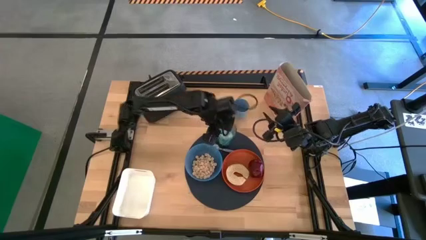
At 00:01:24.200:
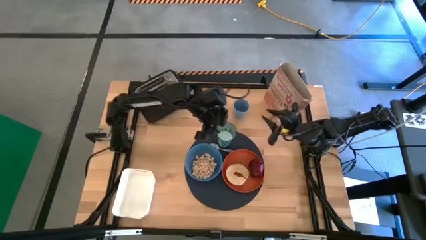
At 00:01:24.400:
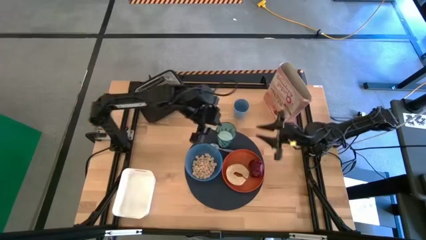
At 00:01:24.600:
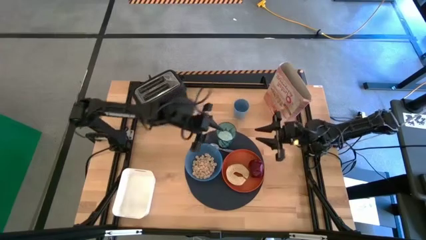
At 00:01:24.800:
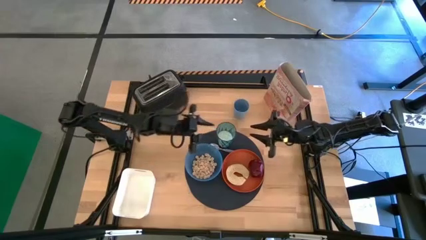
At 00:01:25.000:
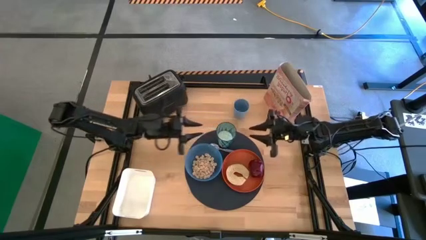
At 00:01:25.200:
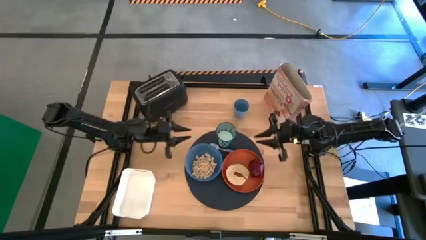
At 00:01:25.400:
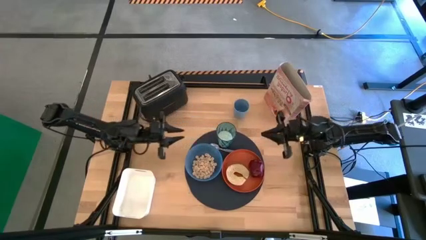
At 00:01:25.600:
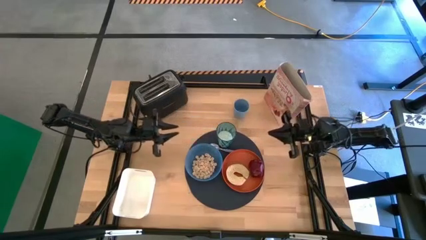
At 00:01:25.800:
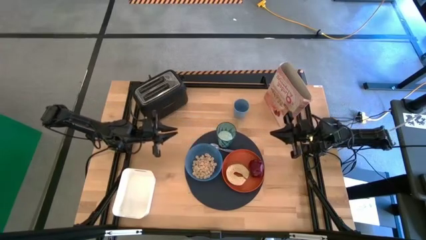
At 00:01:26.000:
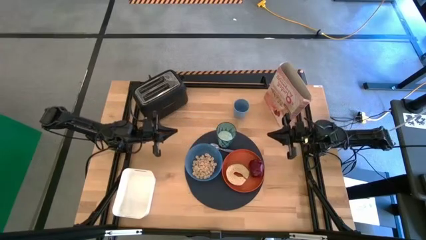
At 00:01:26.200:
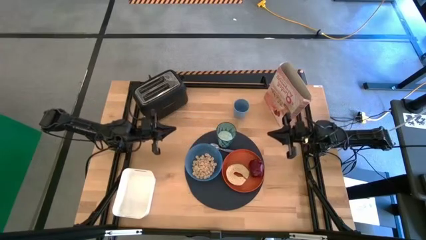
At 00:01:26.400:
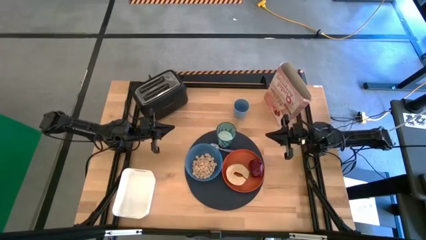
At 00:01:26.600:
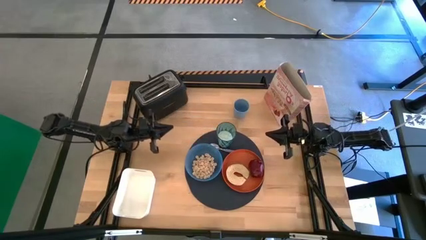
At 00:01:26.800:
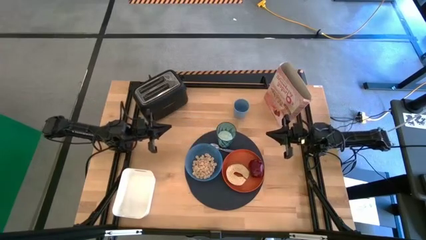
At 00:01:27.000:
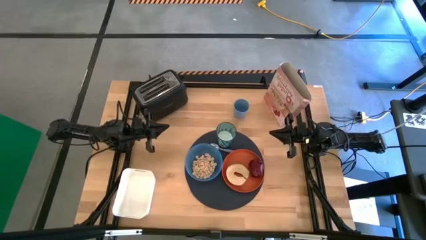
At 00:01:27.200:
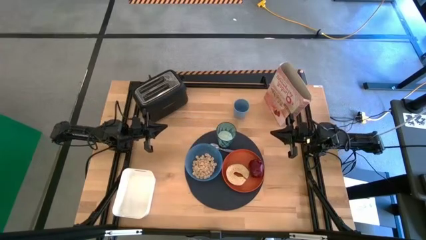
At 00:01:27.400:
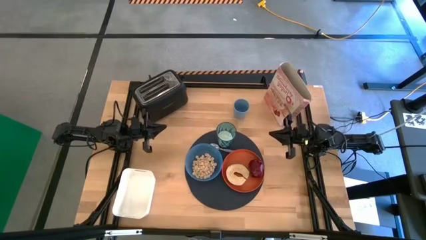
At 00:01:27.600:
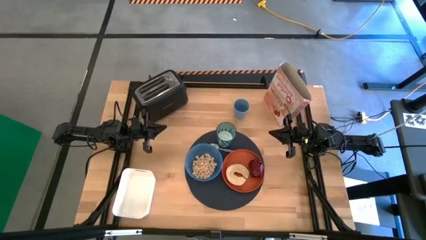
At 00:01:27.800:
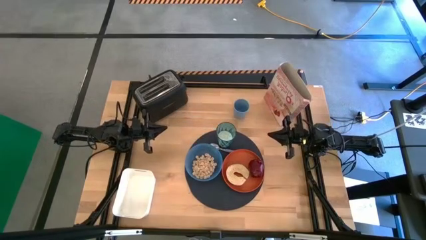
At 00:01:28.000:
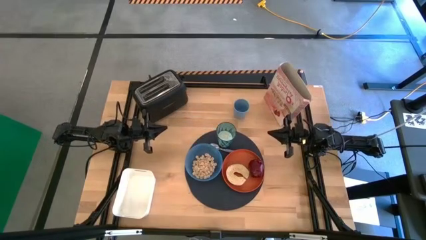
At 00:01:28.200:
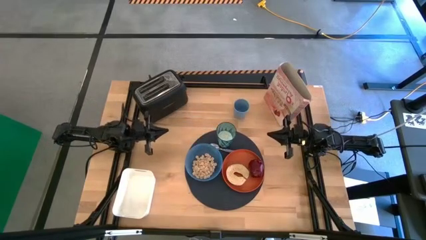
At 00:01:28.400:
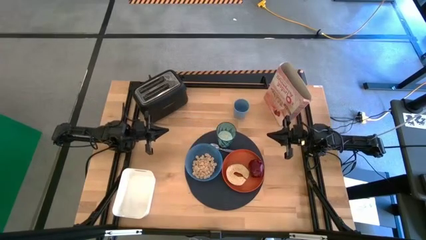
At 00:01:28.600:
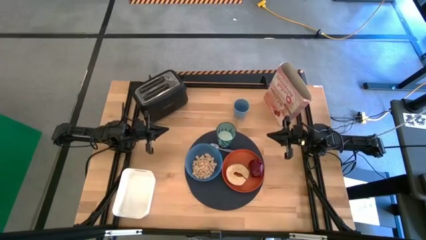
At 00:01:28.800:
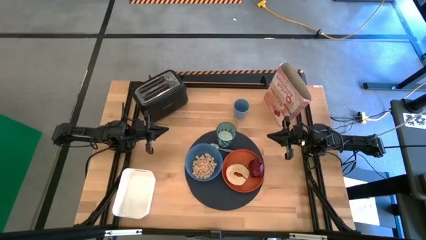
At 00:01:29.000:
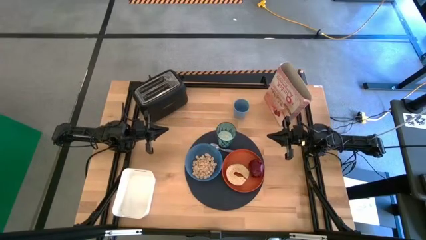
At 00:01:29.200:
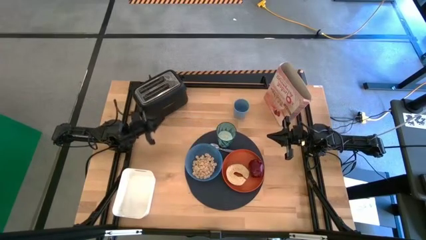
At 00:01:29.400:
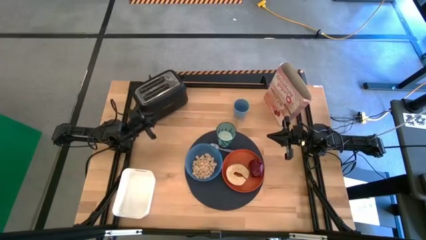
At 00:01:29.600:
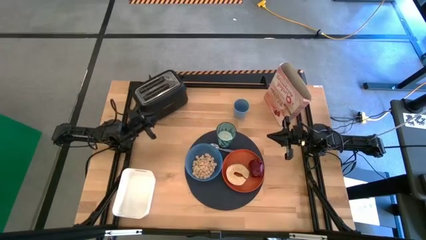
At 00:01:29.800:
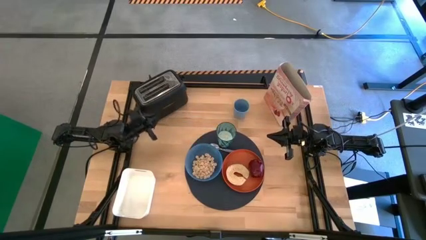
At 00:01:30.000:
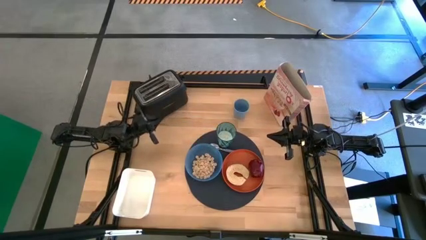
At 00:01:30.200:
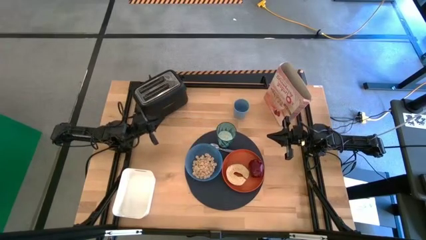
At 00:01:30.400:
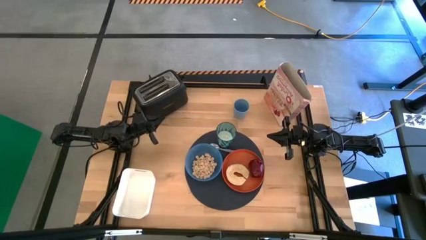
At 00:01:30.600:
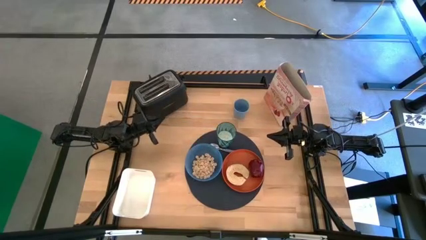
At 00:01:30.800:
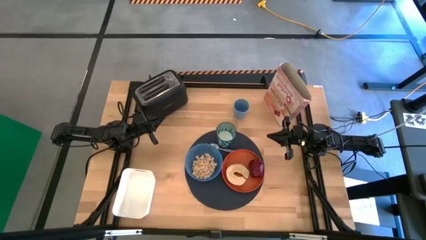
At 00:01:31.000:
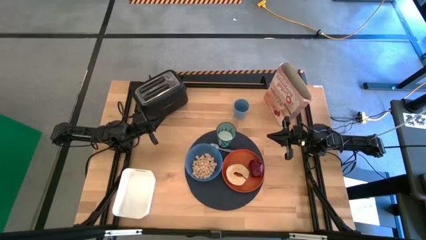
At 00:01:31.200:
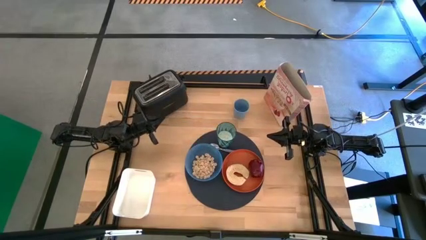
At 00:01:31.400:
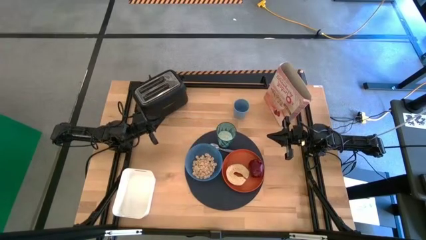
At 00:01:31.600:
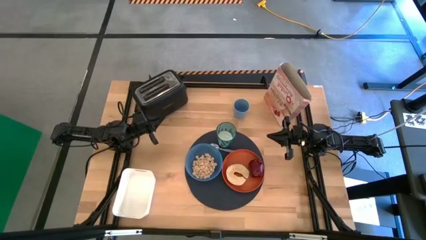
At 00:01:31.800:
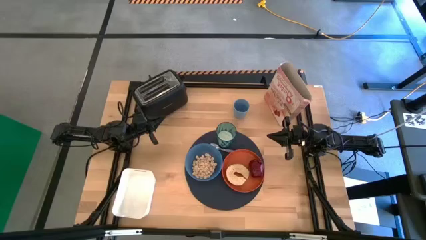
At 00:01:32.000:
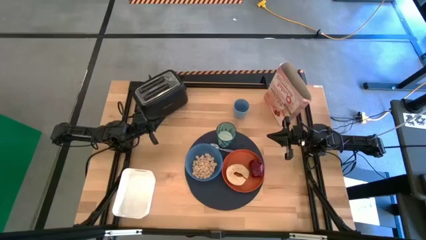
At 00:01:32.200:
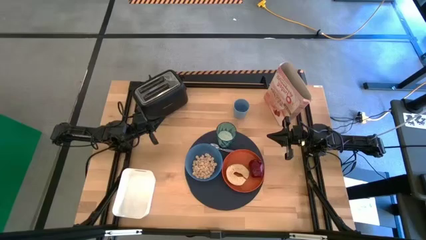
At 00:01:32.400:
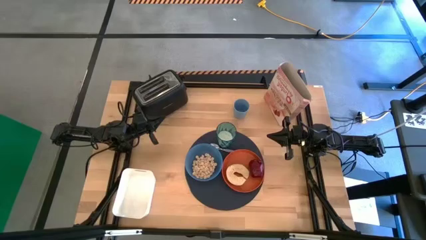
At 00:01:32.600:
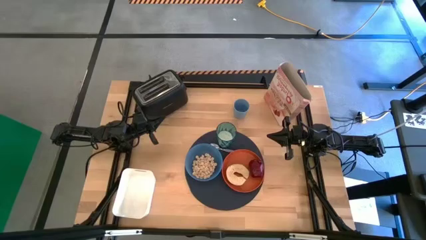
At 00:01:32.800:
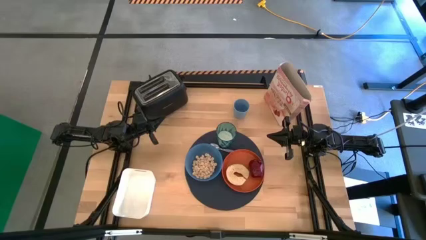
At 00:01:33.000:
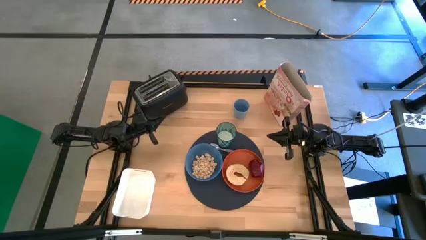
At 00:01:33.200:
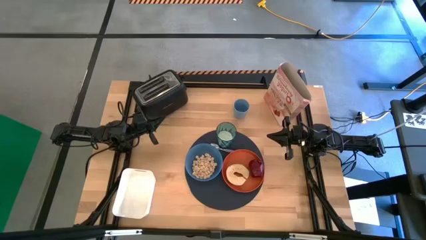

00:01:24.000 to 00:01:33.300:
Task: Arrange a breakfast setting
Return to Home Position
